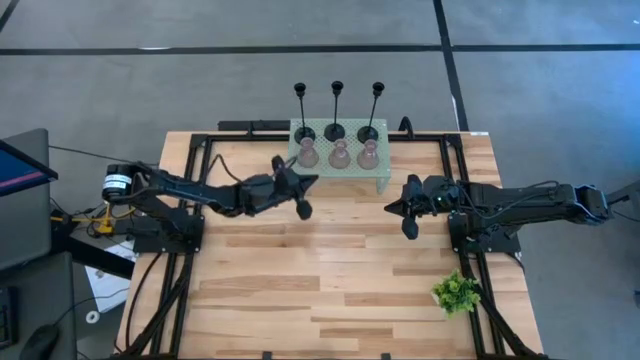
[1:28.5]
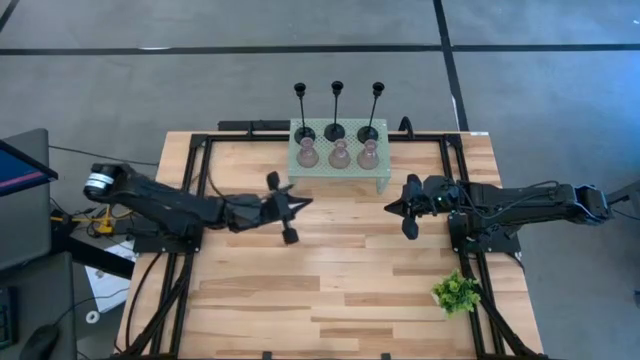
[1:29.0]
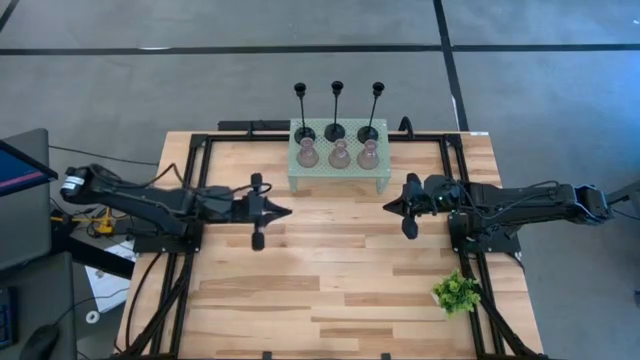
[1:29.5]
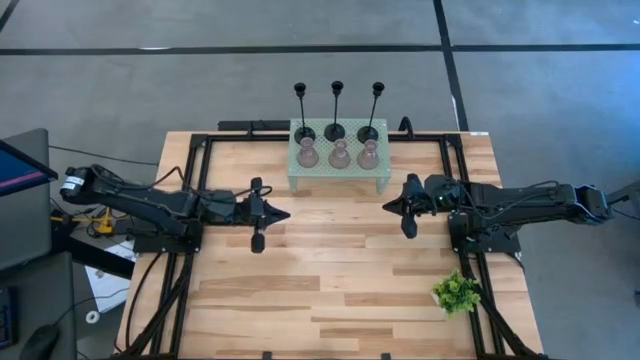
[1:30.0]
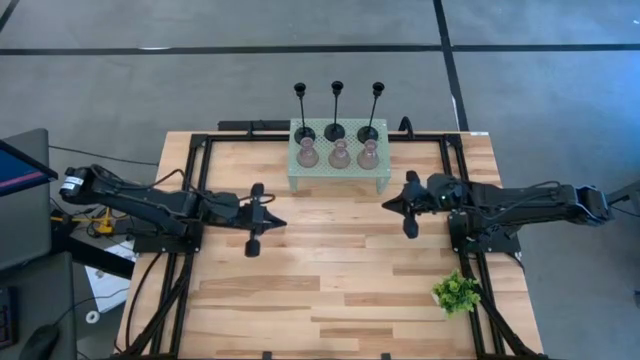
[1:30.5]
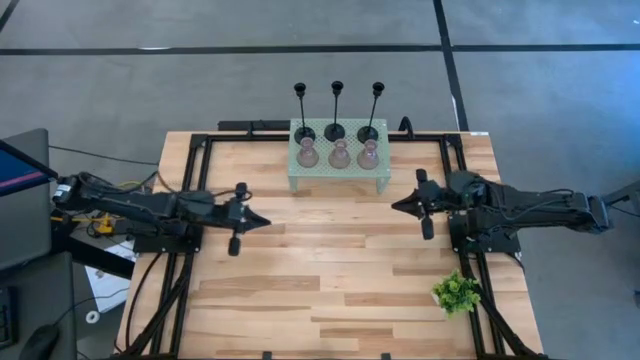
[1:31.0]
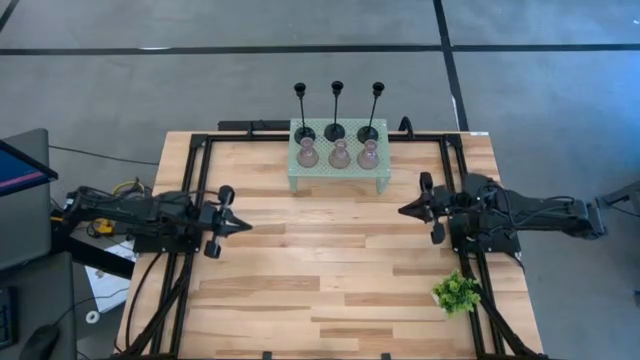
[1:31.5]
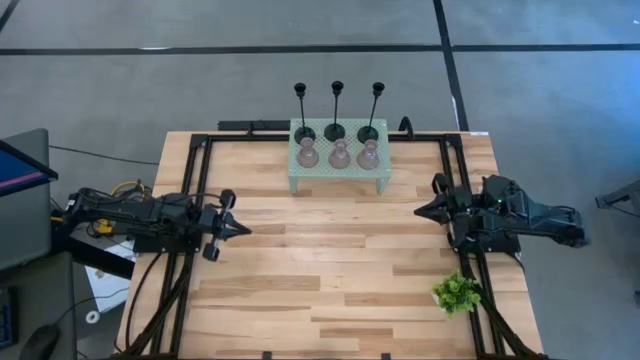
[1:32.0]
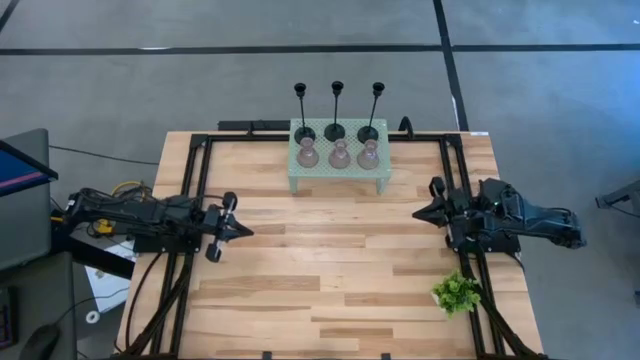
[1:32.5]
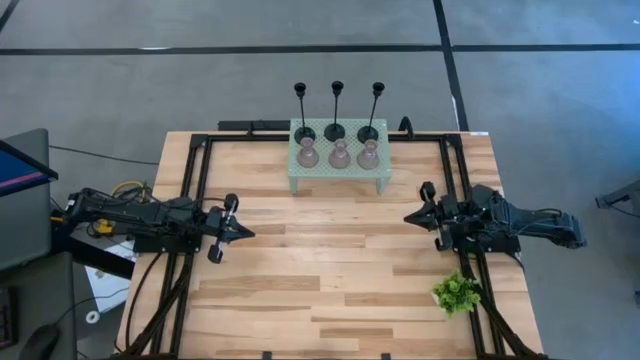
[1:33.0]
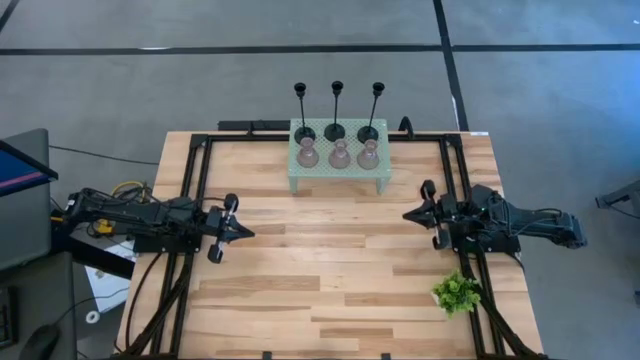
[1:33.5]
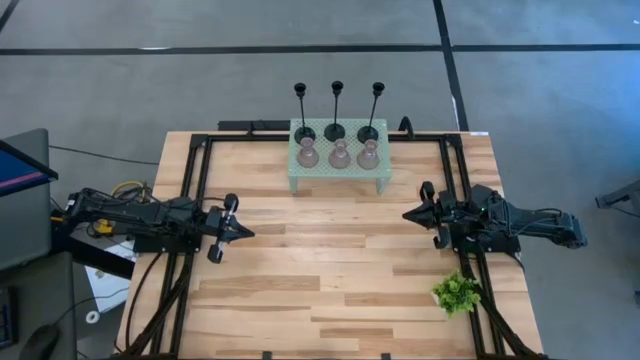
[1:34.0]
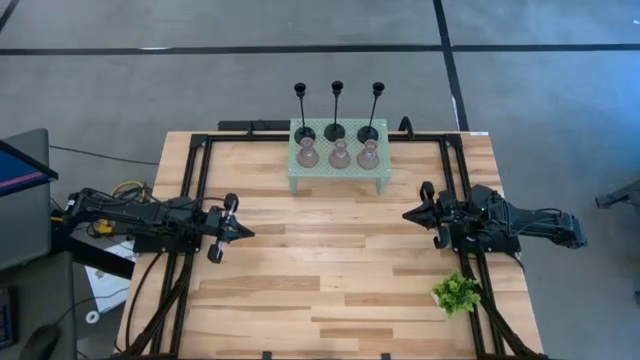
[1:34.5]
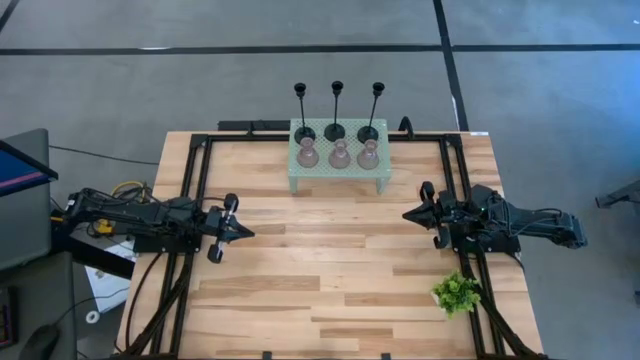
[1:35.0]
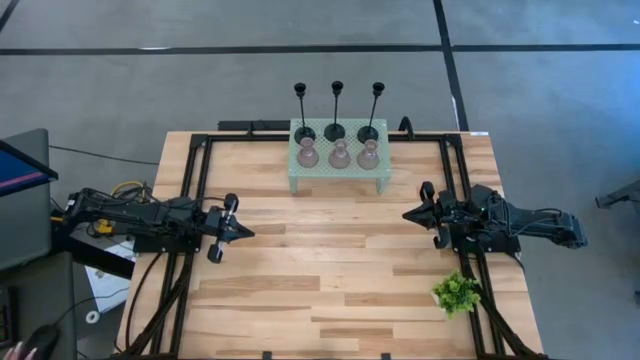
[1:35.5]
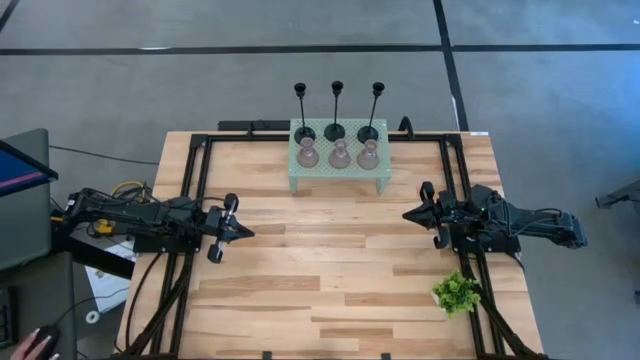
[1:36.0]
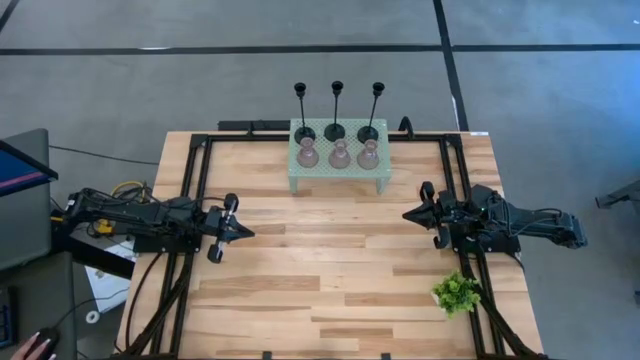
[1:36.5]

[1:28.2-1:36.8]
Task: Pick & Place candle stick holders
Return to Home Position

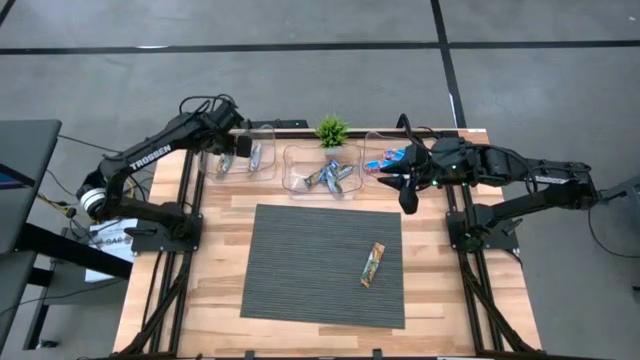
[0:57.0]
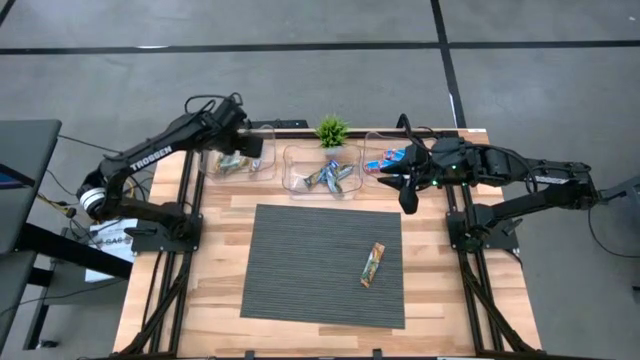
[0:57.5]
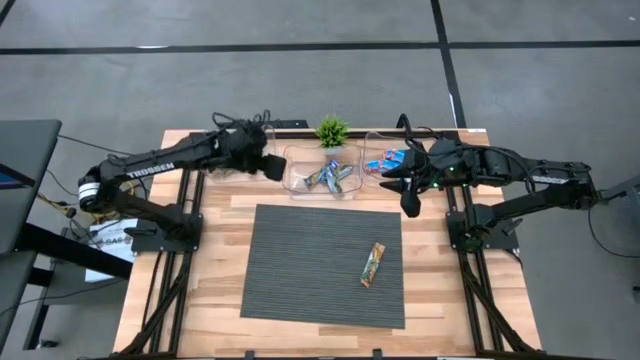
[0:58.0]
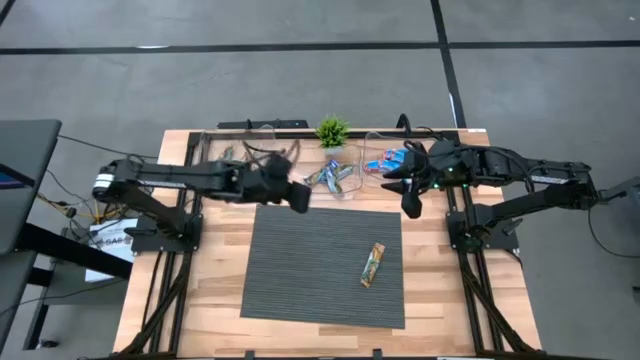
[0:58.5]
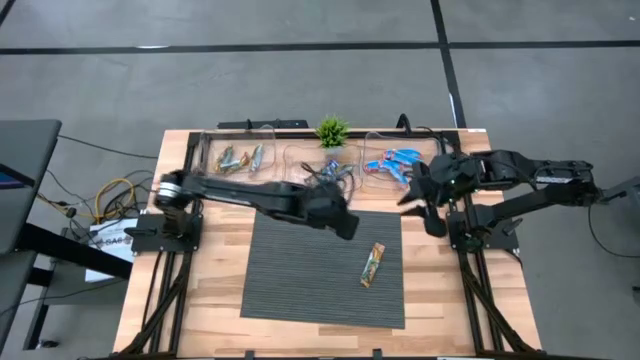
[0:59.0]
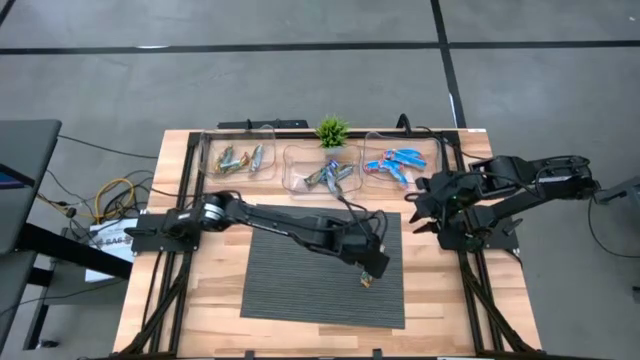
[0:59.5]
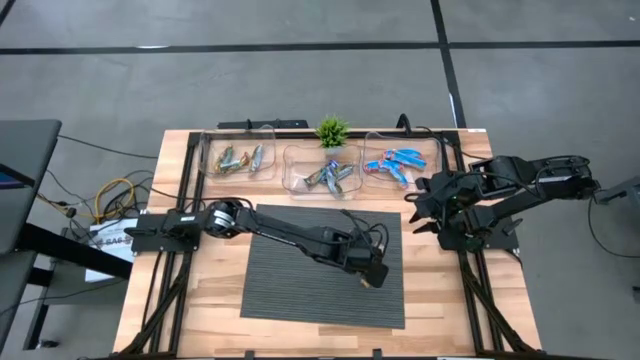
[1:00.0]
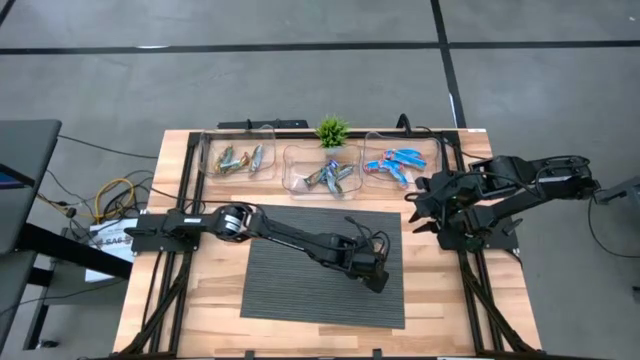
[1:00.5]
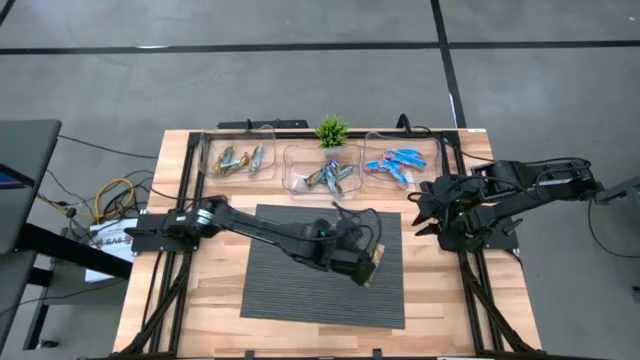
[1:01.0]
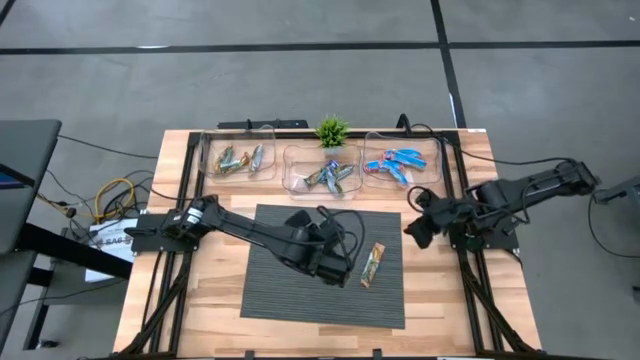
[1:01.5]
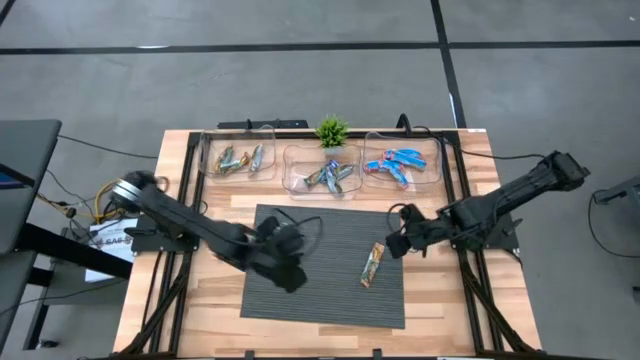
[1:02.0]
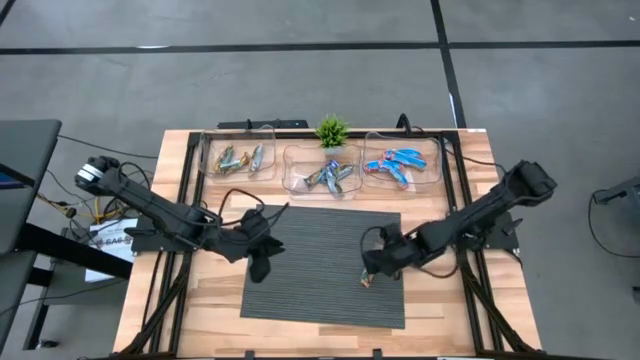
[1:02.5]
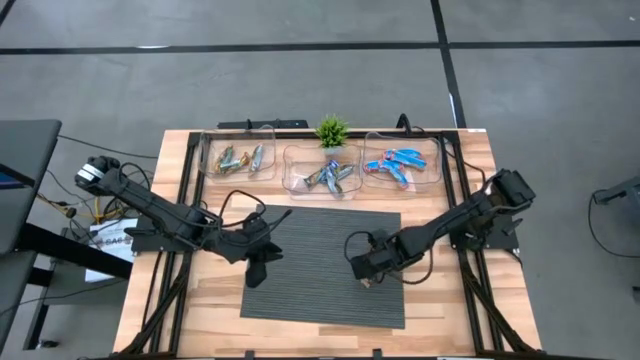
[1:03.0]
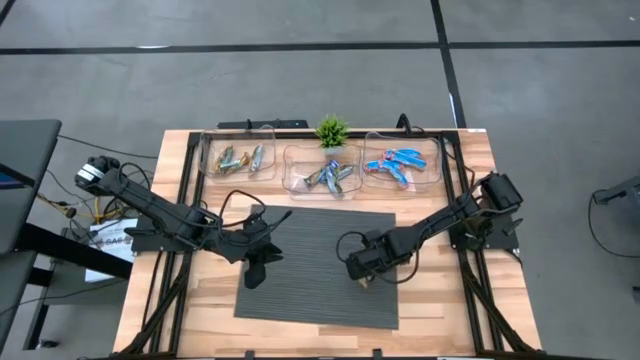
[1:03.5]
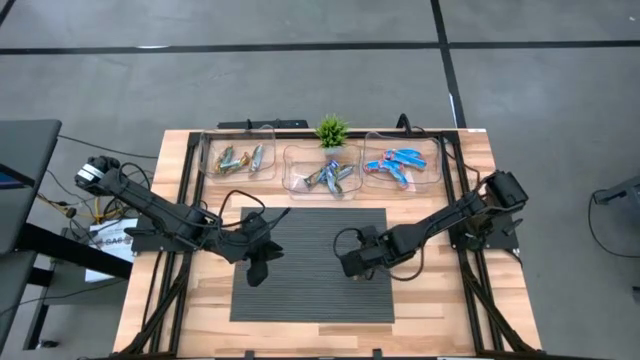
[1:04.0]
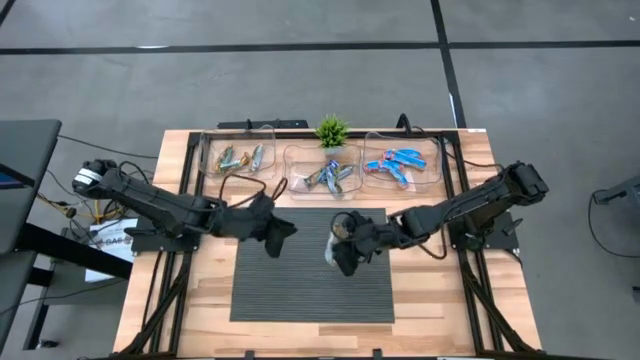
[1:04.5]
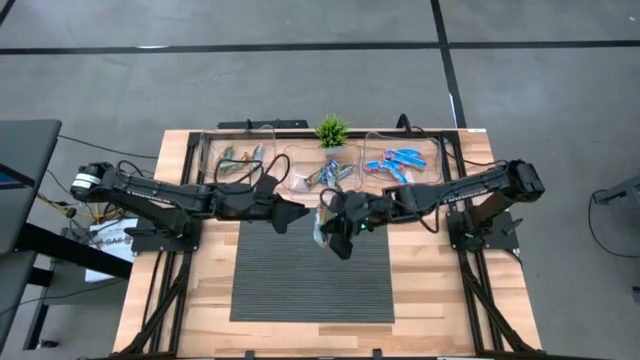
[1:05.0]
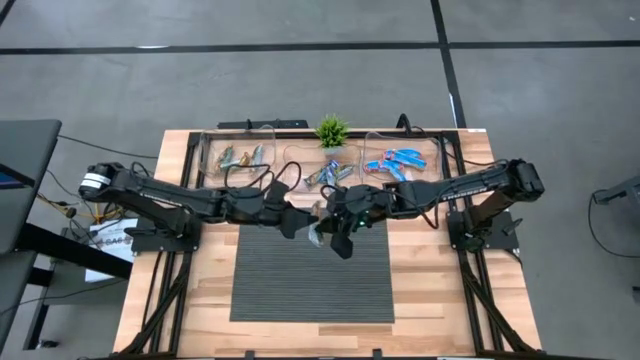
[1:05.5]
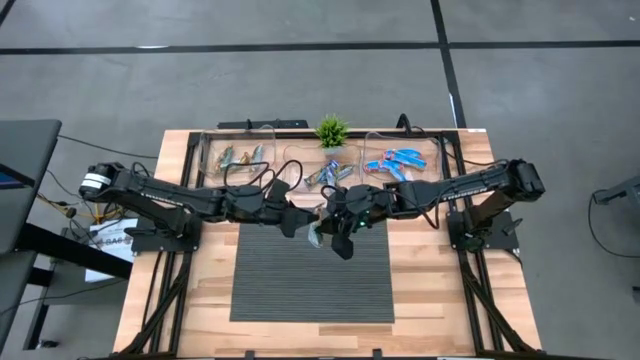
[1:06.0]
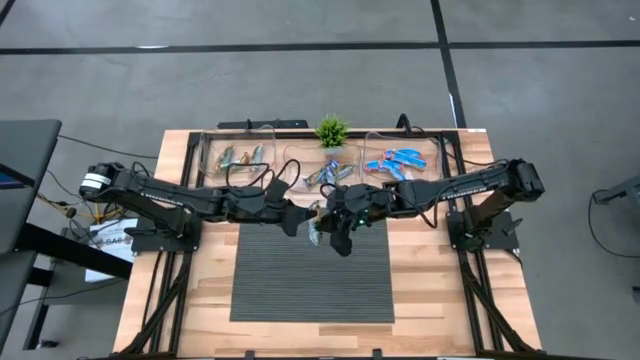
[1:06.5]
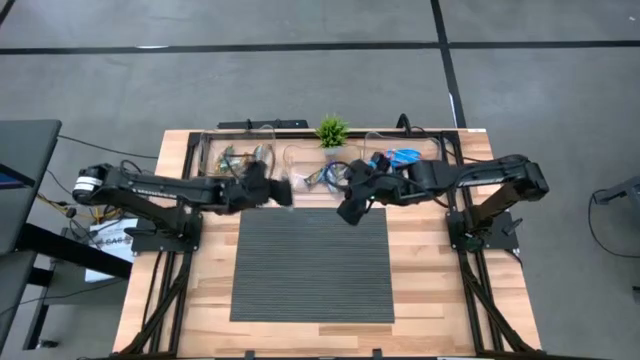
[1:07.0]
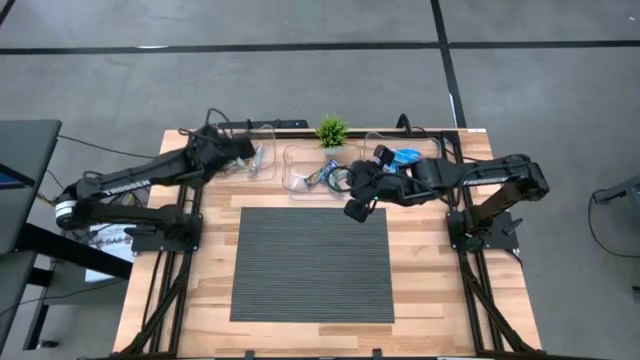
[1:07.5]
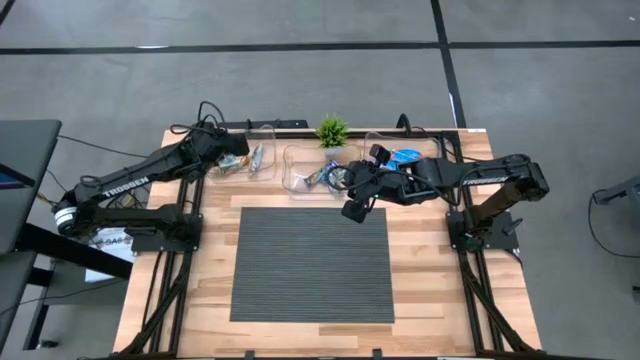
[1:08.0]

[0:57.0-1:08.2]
Task: Pick and place Granola Bars by type
Put the yellow granola bar into the left transparent bin
